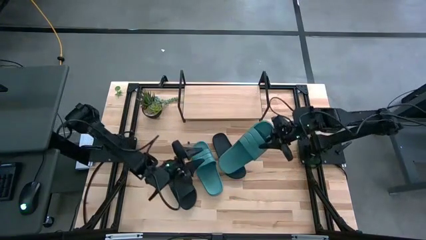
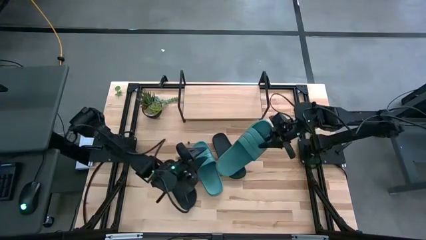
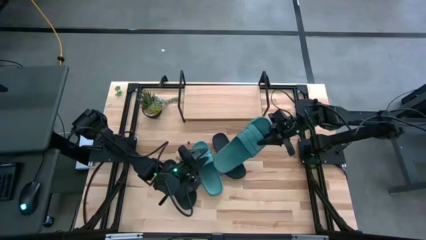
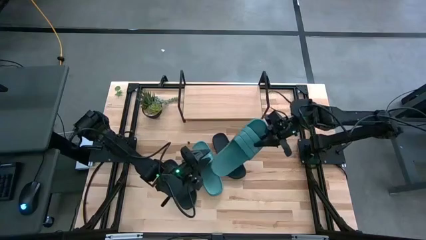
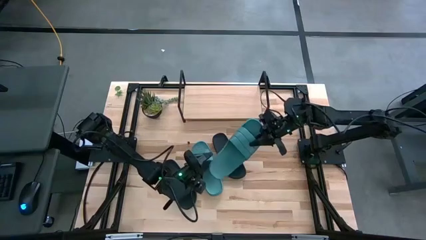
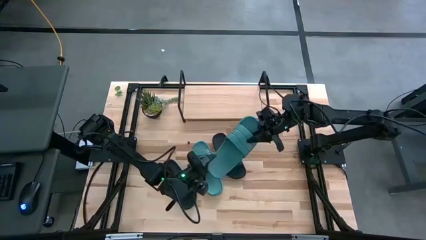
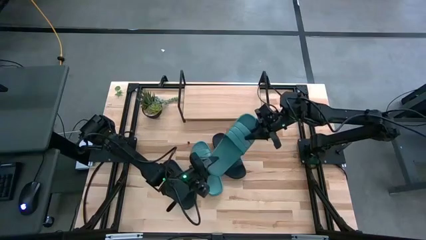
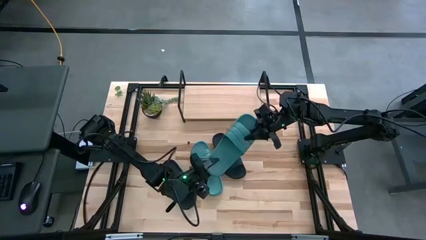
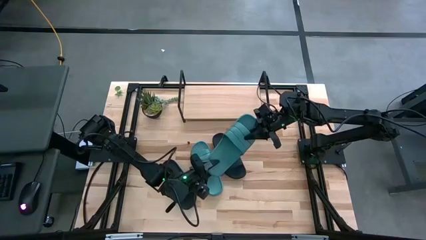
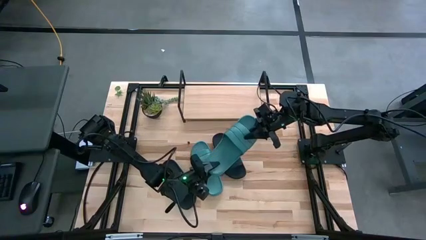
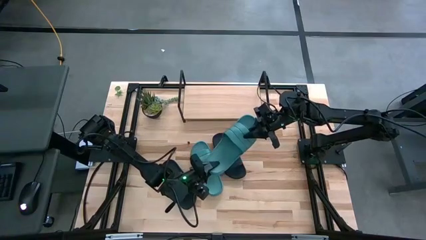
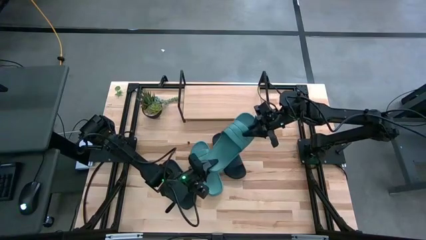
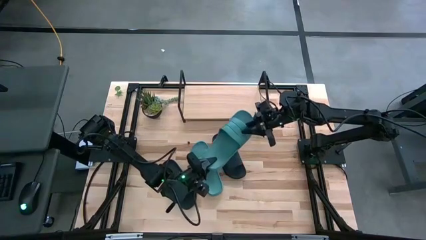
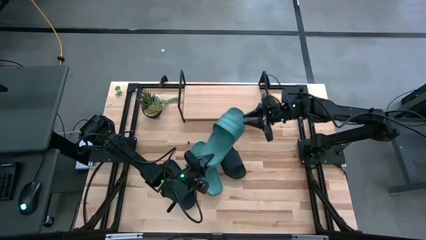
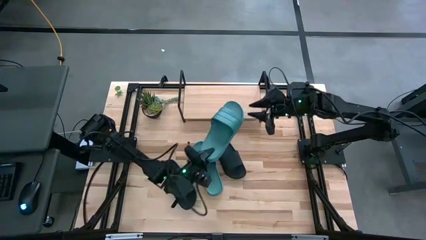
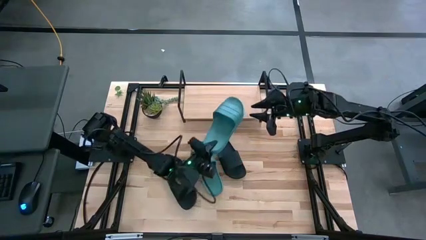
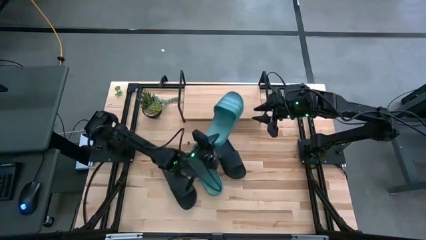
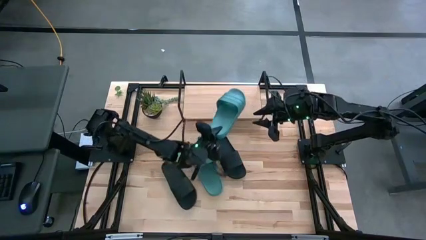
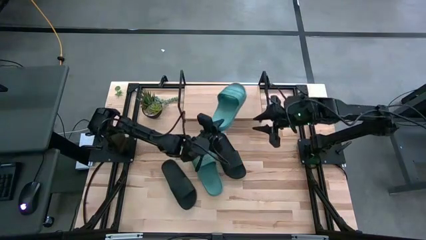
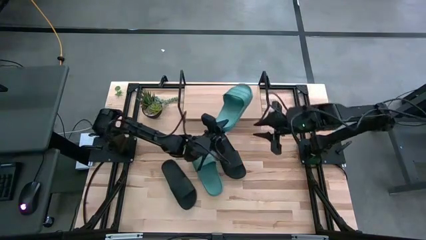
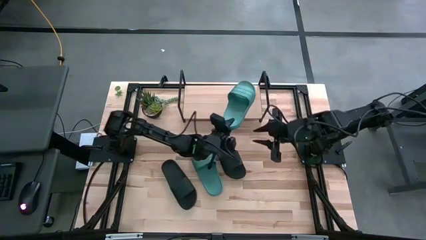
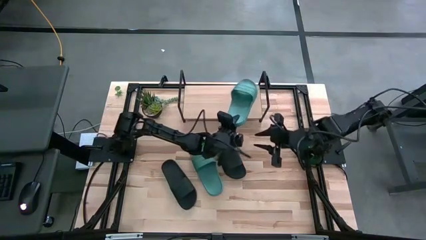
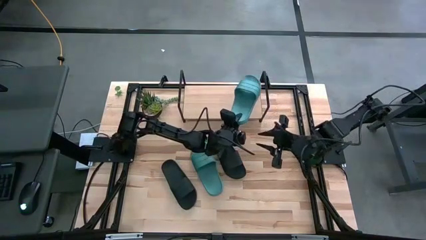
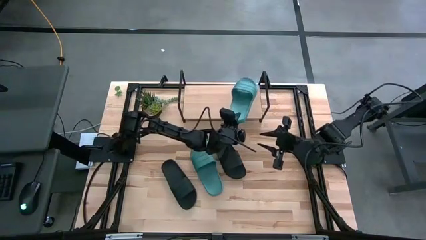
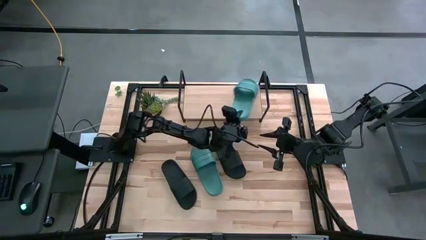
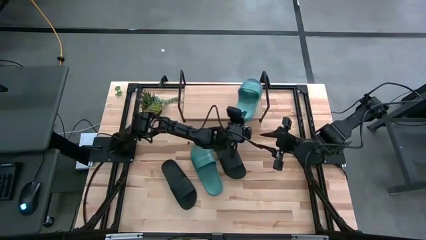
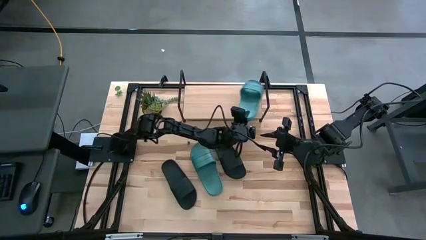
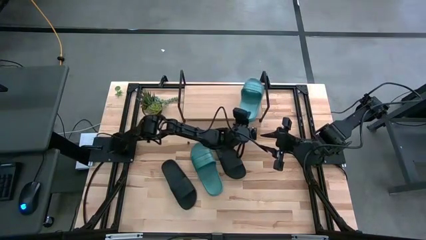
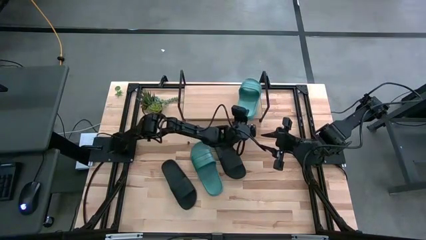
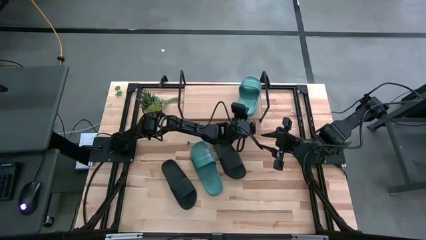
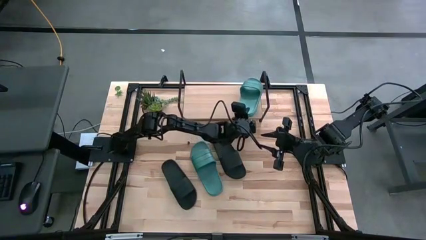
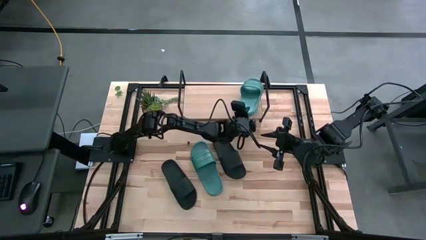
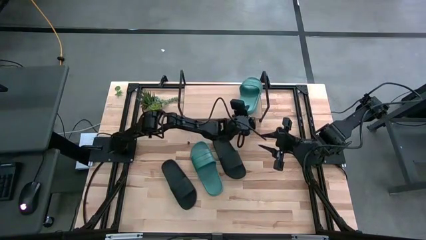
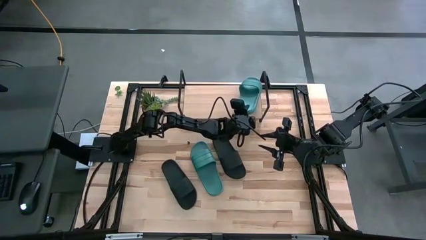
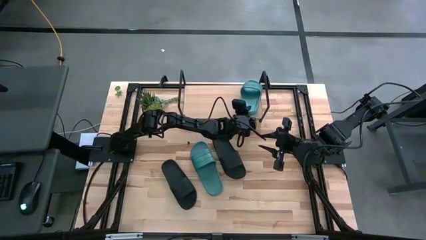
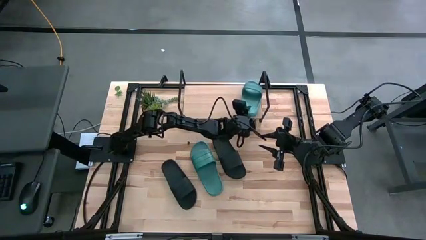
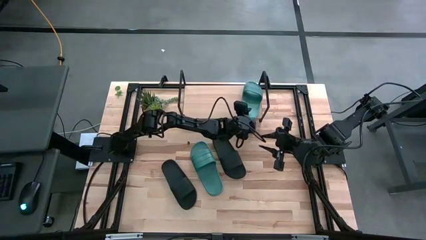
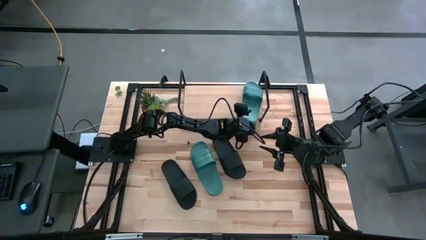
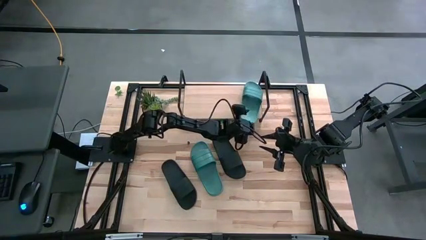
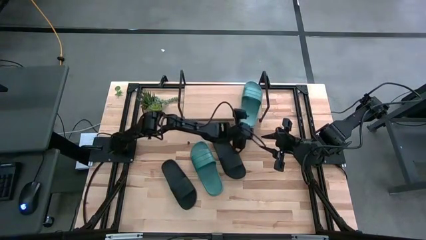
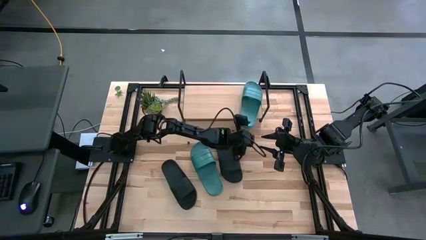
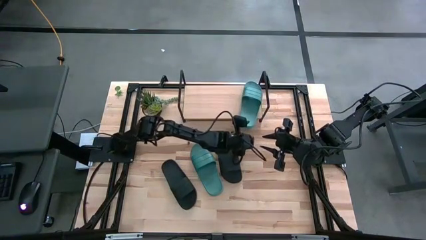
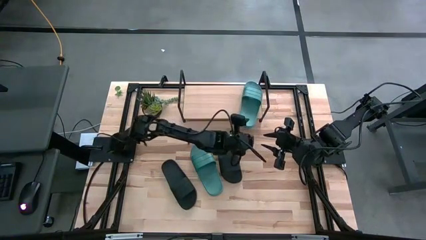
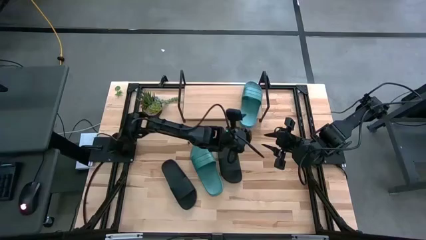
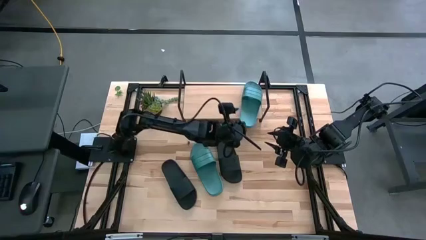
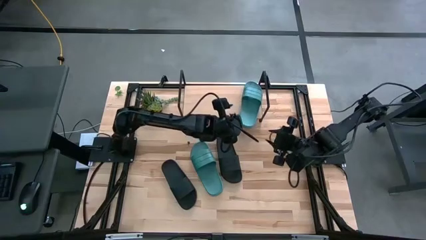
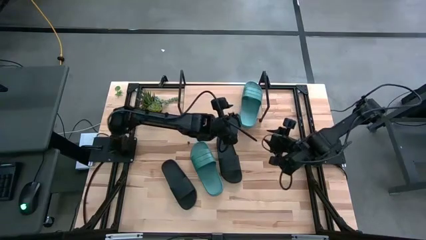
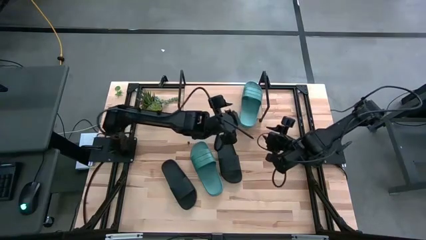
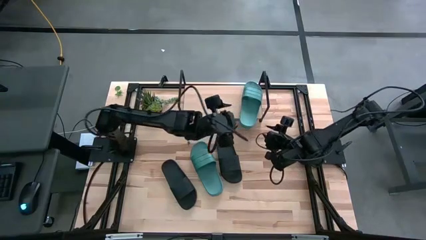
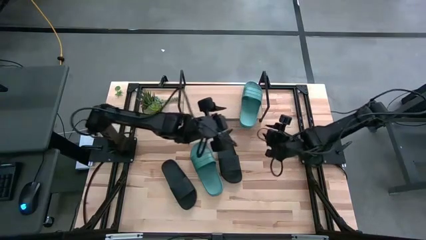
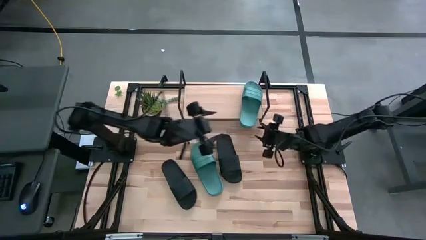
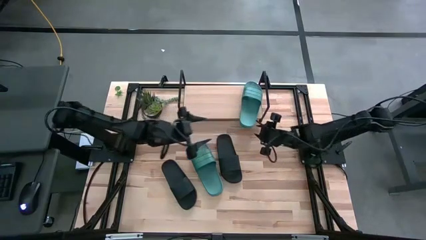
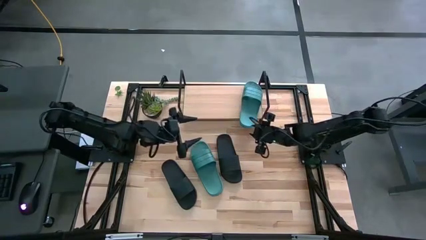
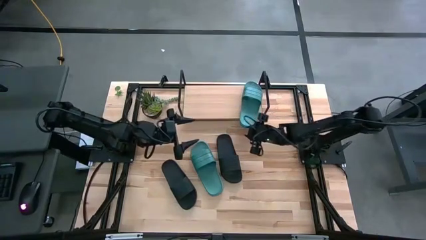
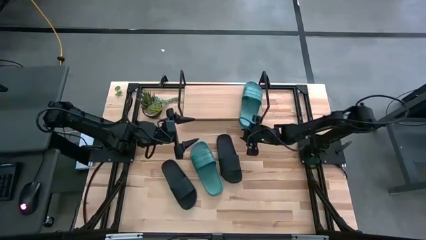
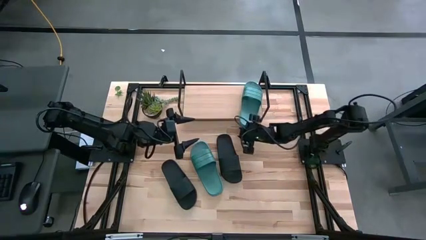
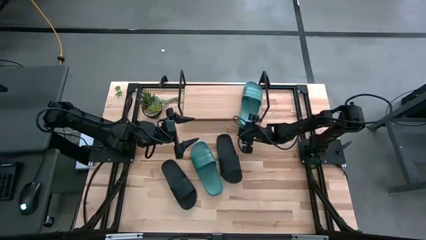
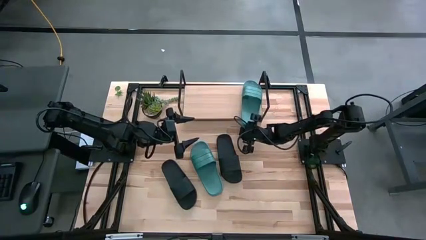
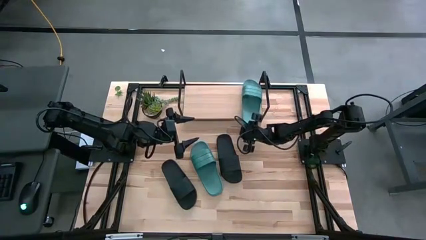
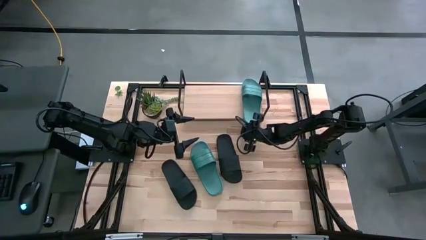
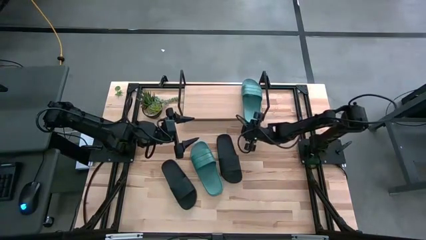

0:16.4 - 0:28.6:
Task: Pick and place slides into the shelf
Put the right green slide on the shelf

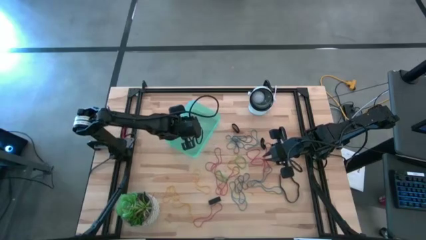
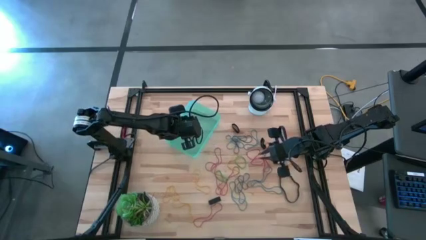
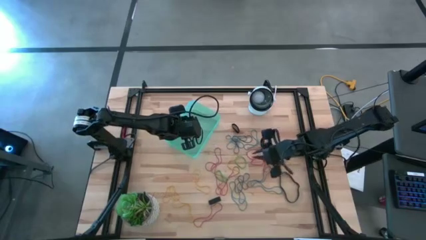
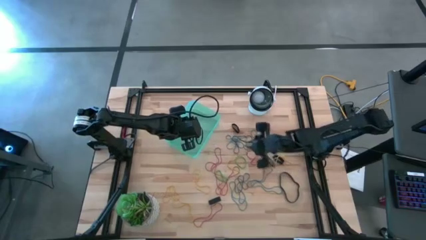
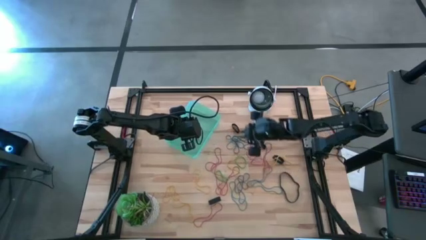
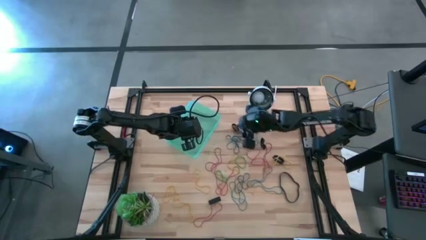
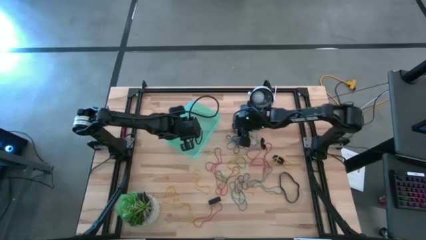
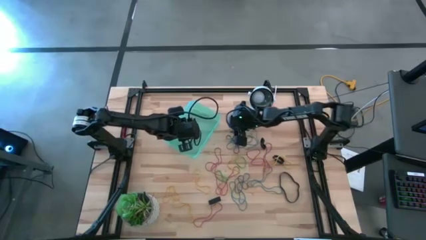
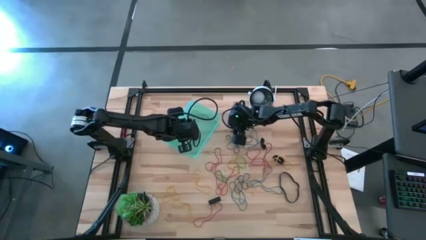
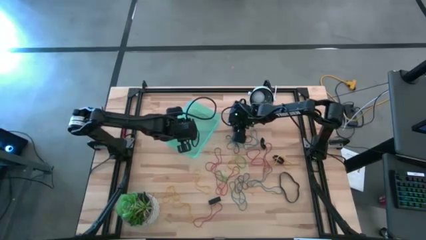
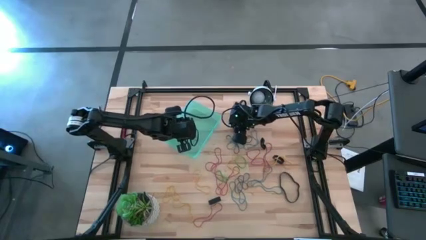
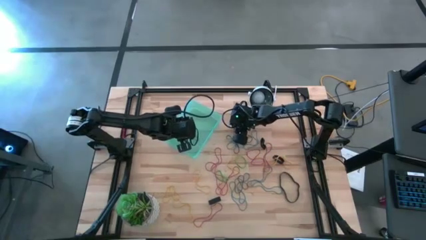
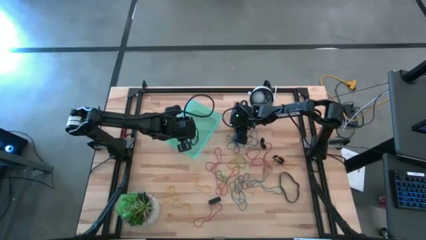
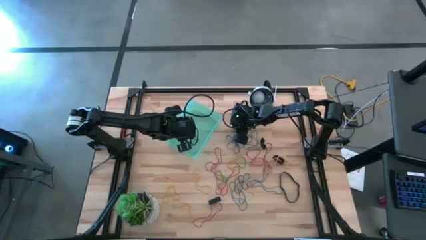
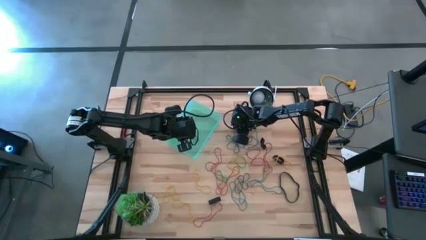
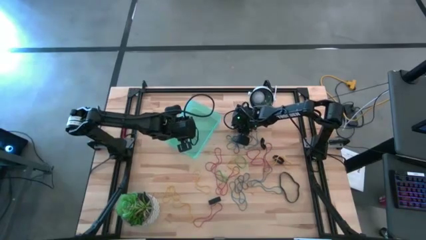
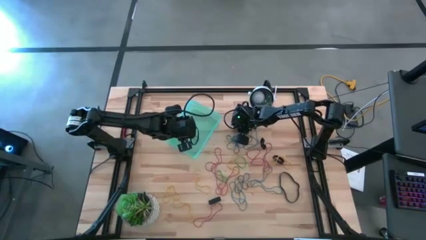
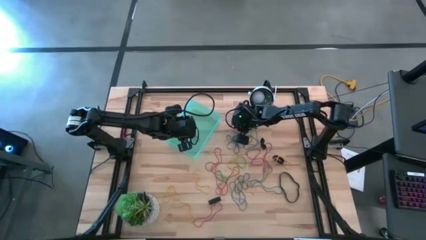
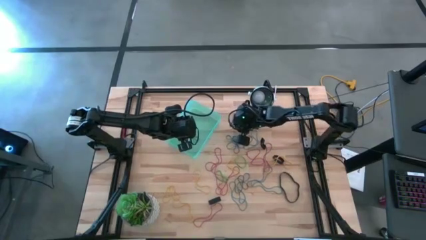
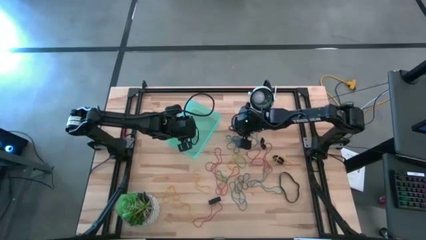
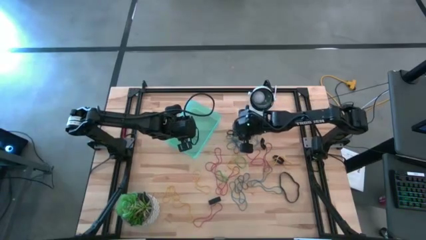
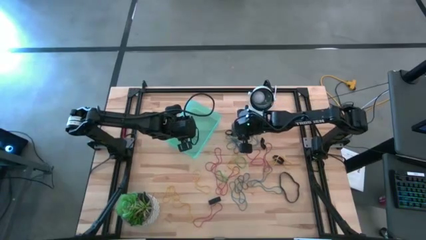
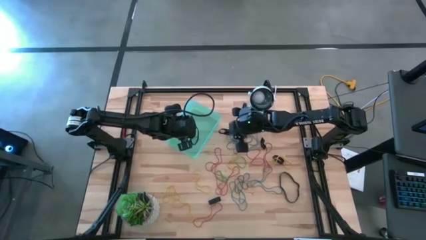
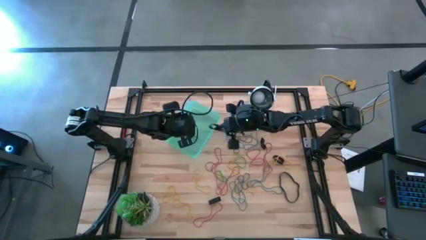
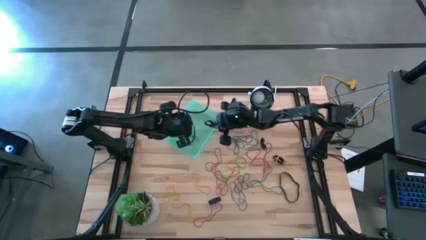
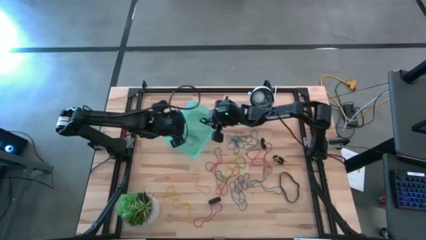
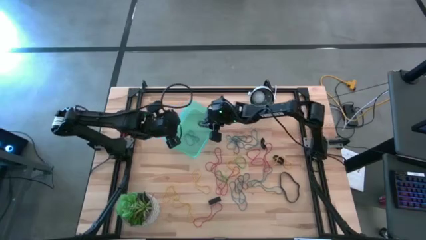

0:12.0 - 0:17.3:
Task: Pick and place rubber bands into bin
Put the black rubber band into the green bin
